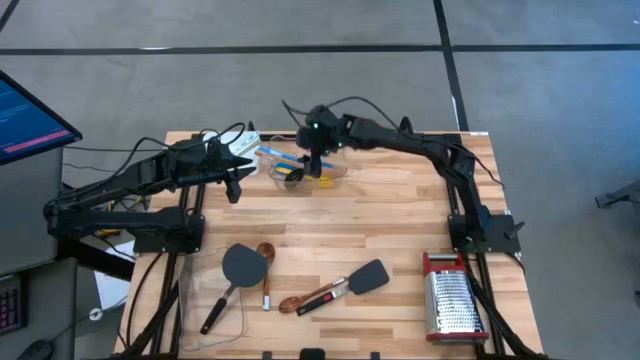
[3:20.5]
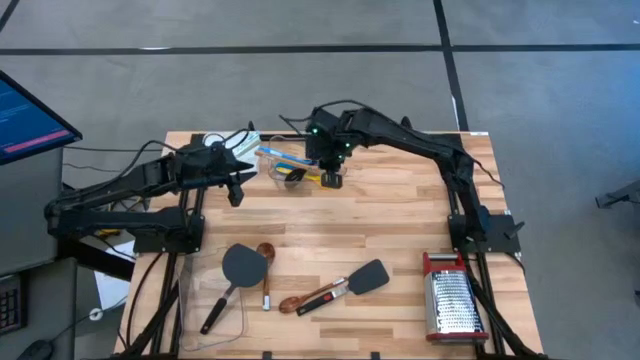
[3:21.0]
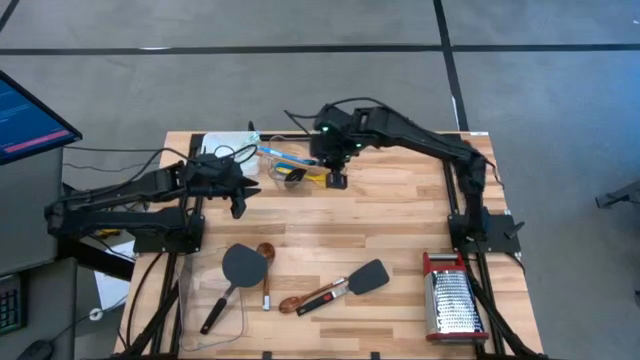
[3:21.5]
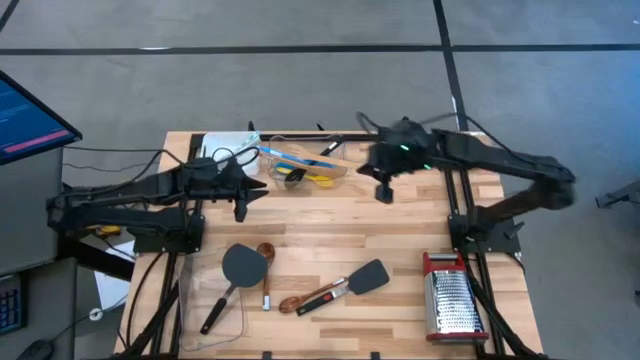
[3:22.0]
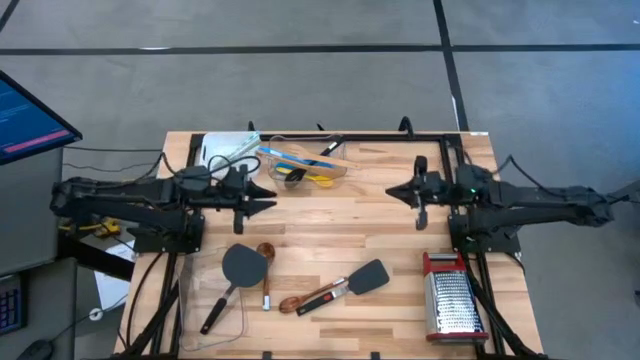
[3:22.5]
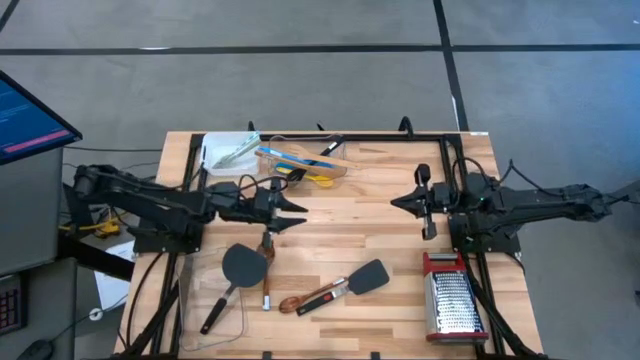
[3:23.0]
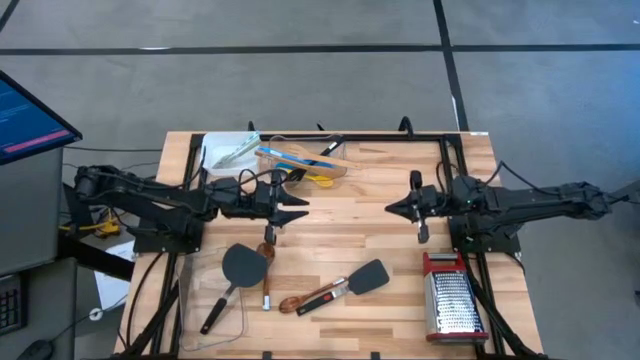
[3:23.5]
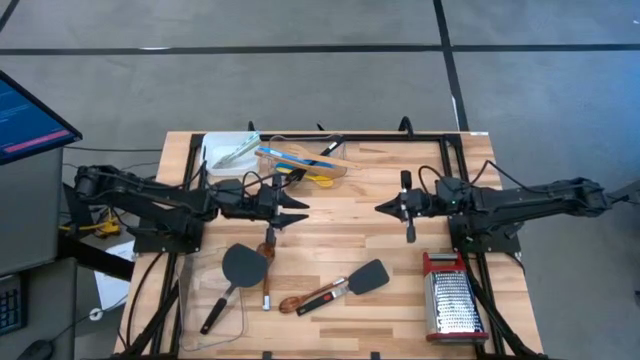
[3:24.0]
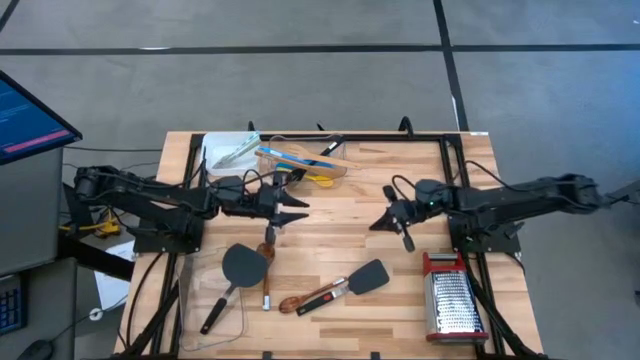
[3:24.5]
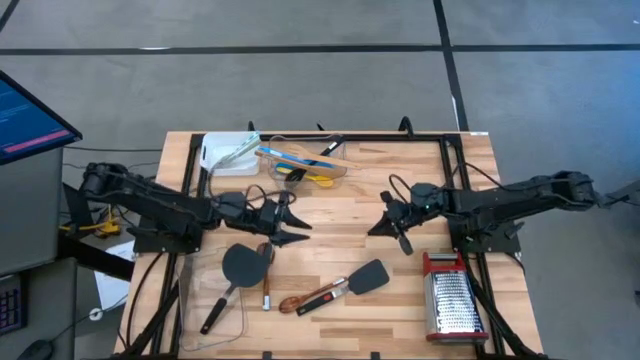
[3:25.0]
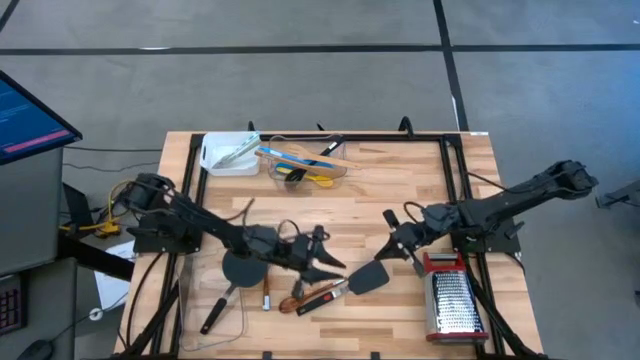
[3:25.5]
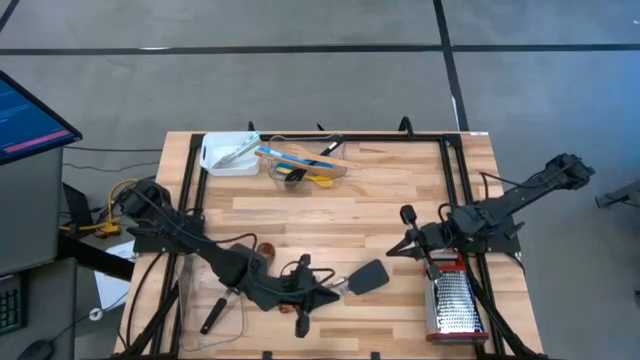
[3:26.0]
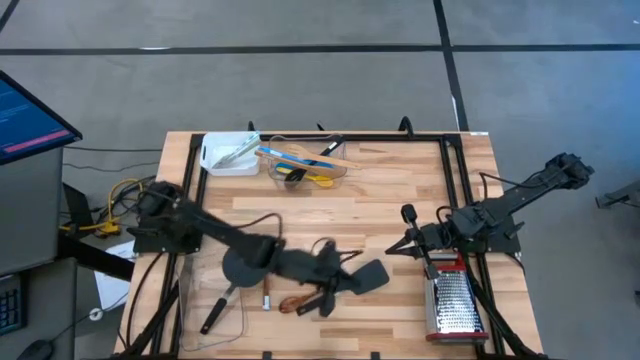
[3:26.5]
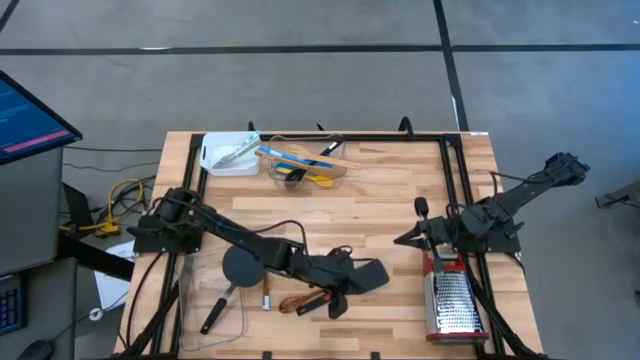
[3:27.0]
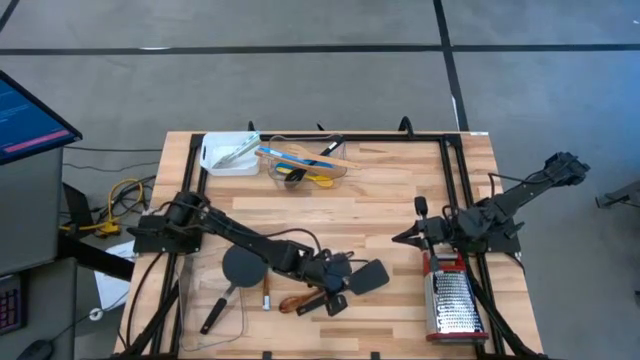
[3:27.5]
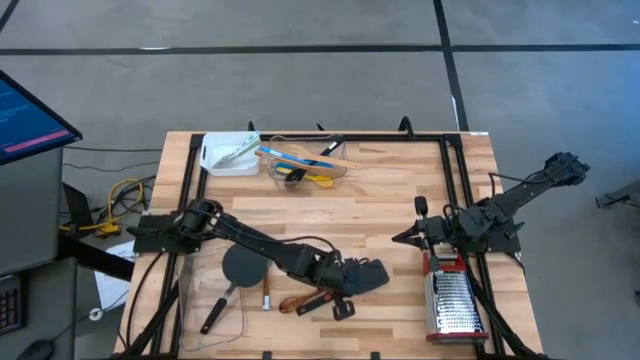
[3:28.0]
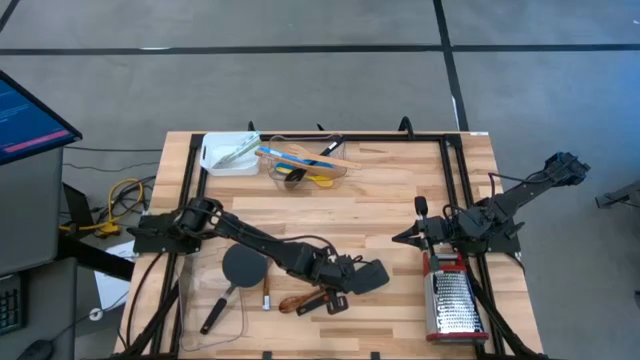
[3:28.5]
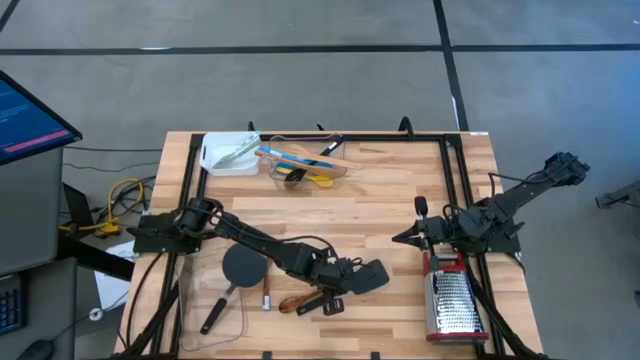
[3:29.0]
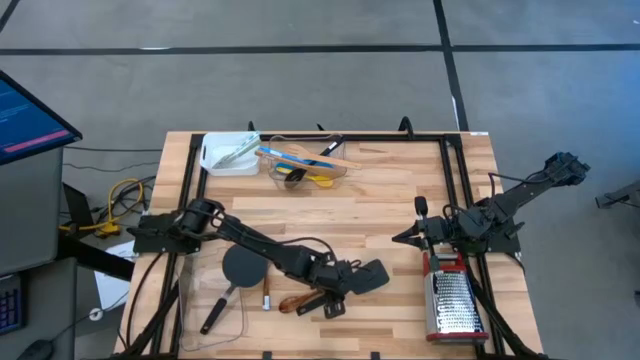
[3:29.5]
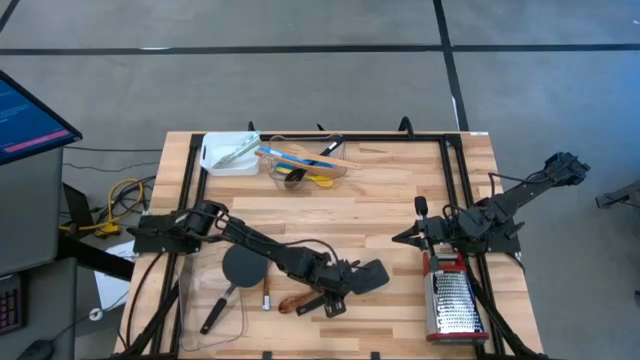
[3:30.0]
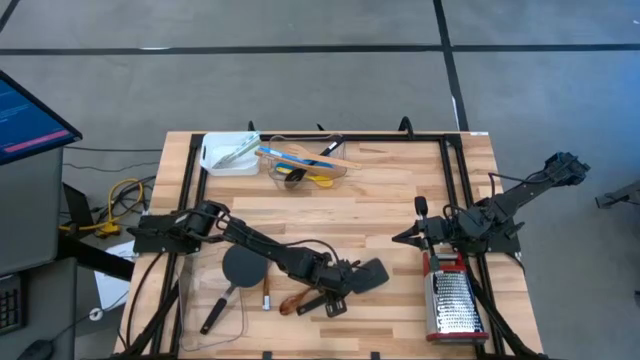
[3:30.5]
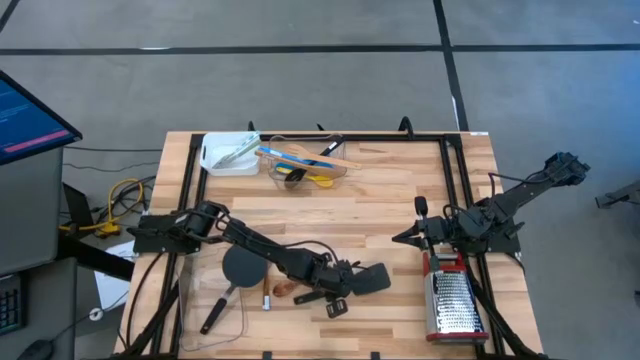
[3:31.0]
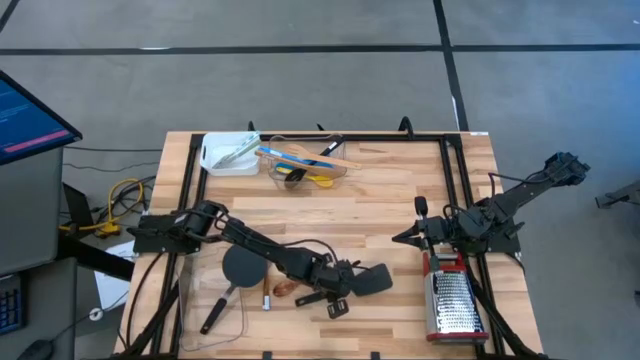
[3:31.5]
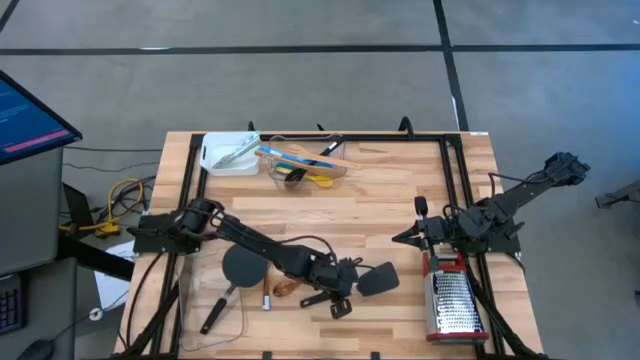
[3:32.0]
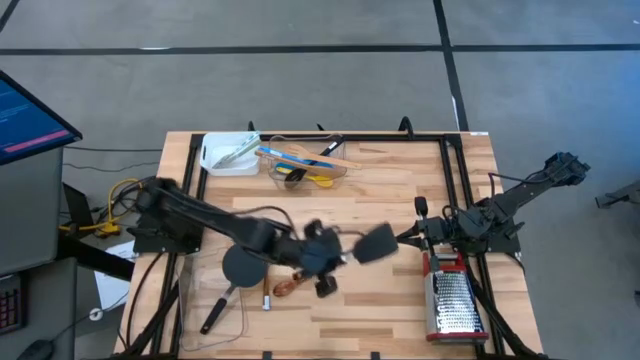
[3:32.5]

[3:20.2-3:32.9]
Task: Pick & Place Kitchen Items
Put the black slotted spatula into the bottom transparent bin

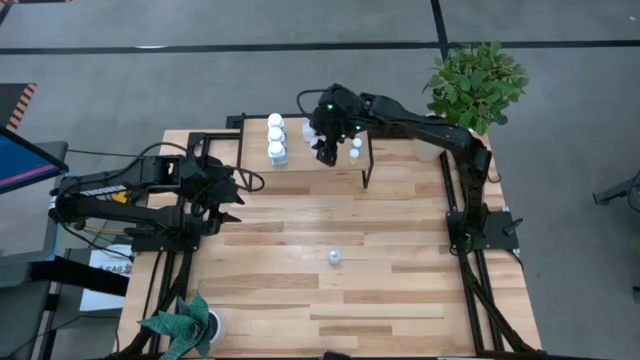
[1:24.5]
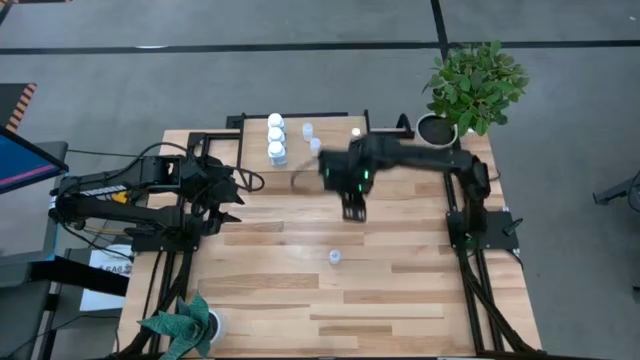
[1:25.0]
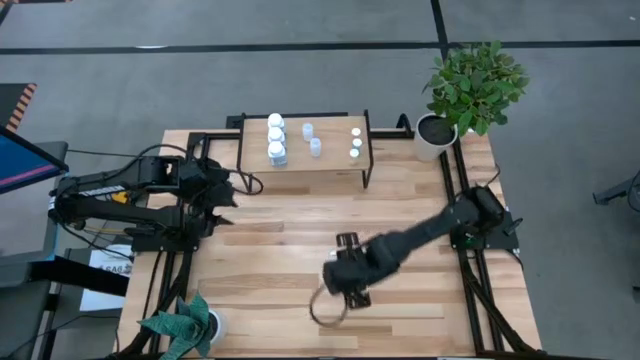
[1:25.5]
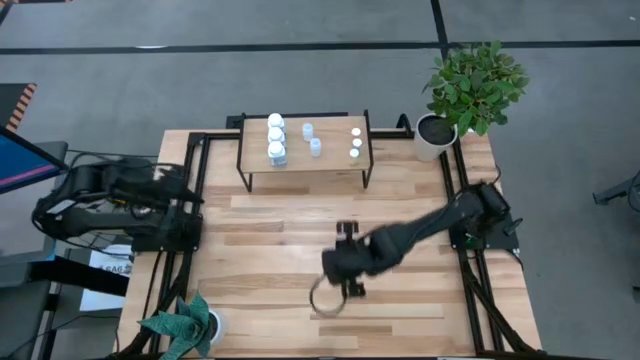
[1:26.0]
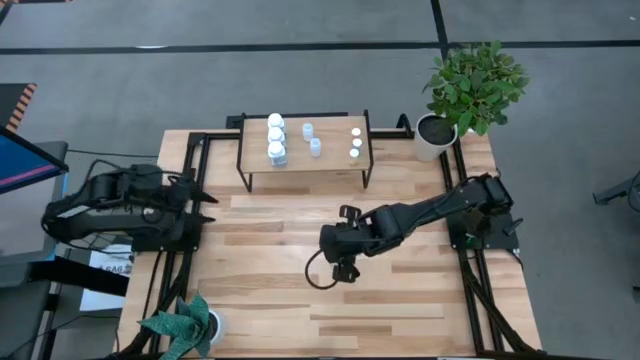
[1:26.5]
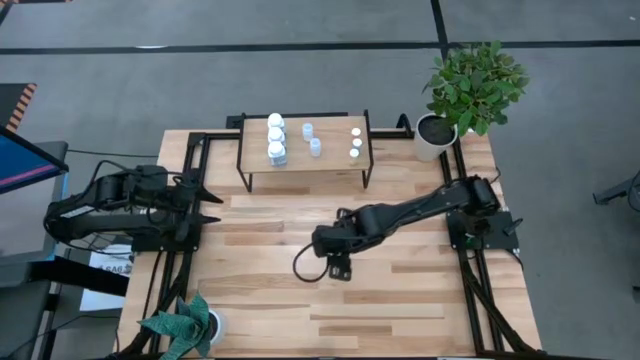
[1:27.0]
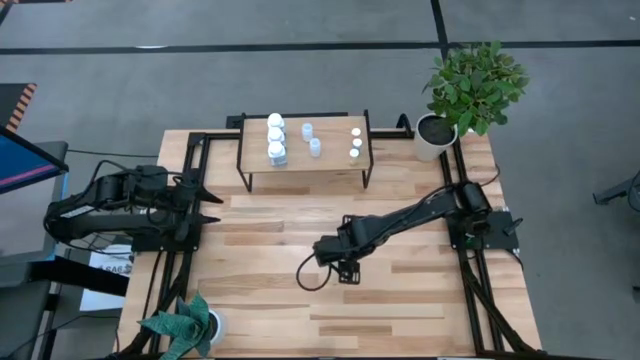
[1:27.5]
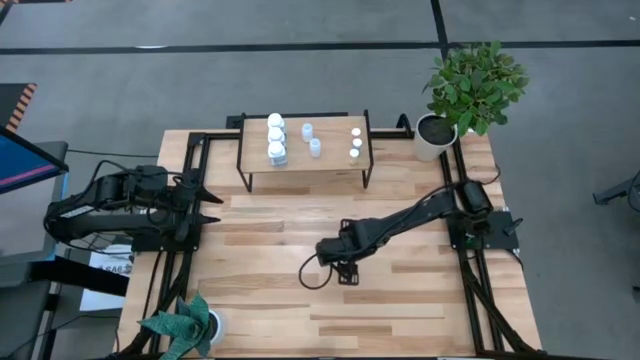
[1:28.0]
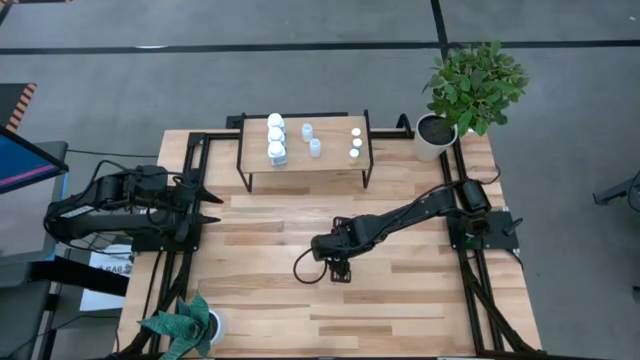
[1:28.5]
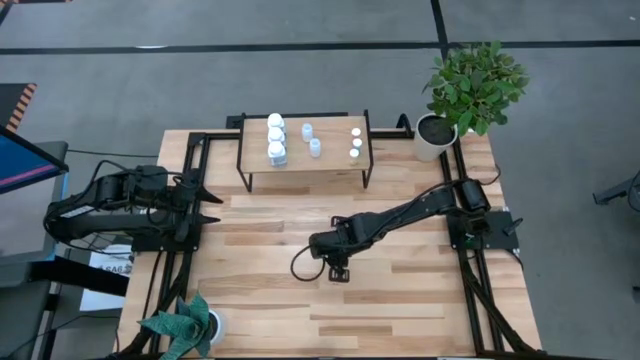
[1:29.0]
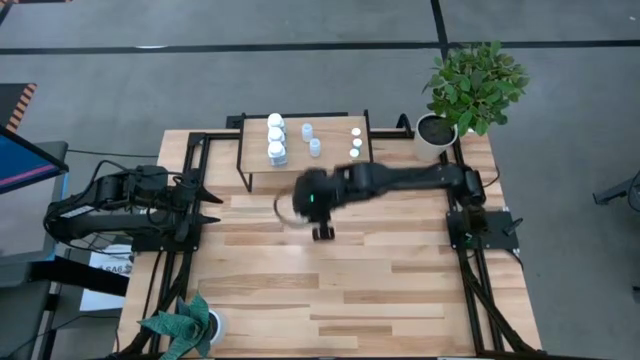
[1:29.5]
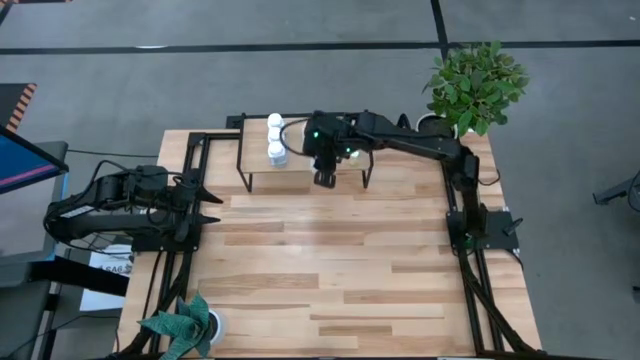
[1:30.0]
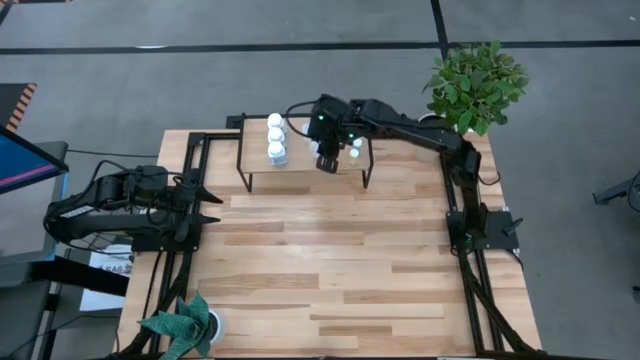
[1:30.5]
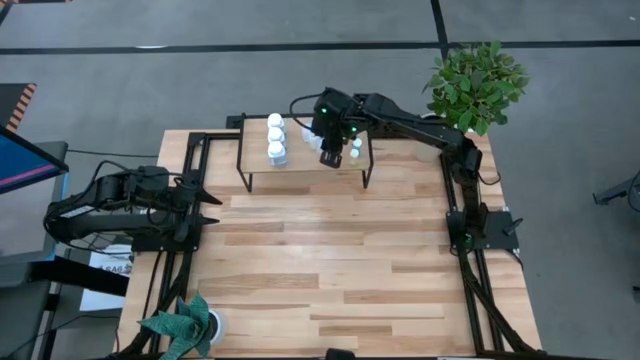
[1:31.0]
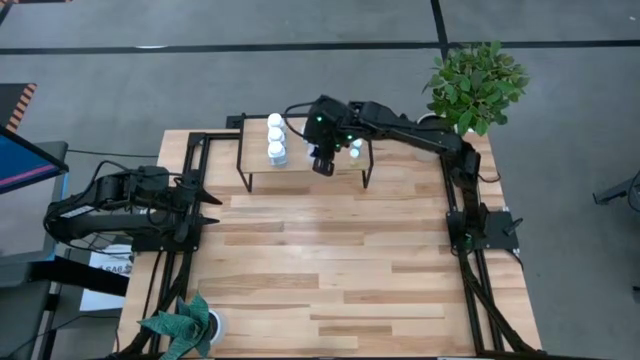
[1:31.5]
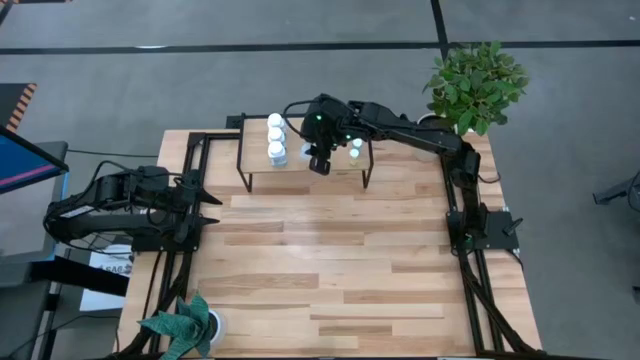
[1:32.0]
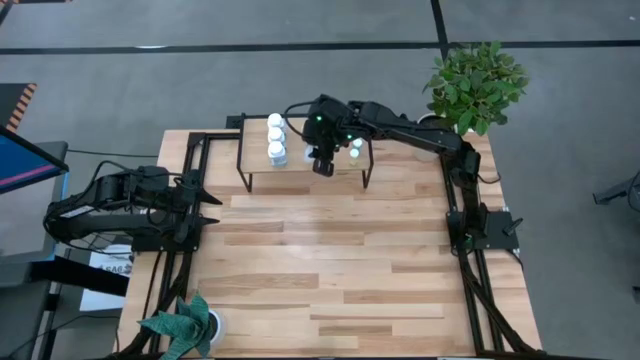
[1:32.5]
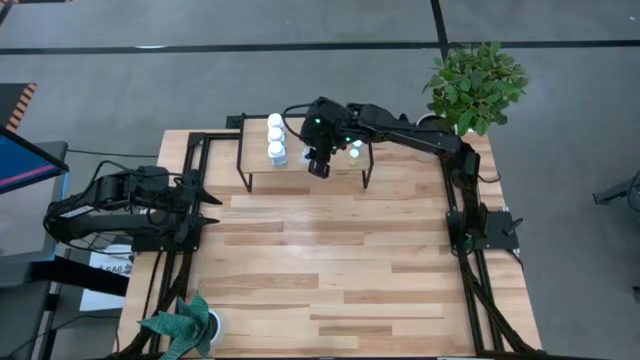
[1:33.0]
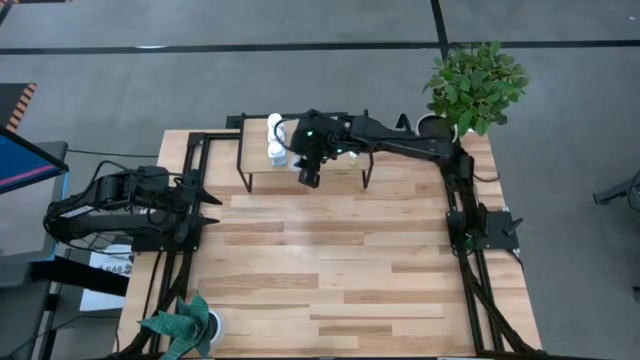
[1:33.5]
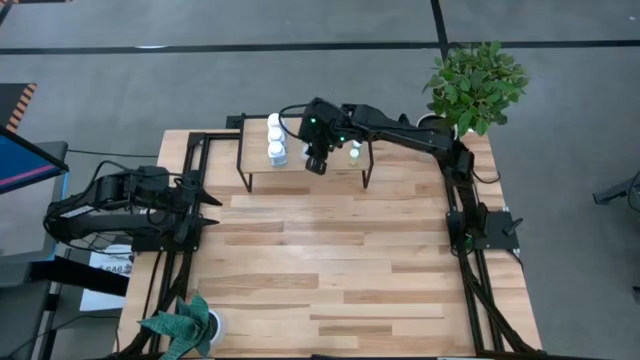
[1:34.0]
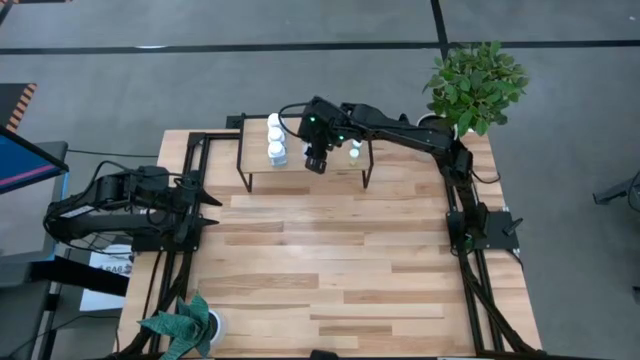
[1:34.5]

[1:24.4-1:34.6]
Task: Pick and place medicine bottles onto shelf by color
Put the transparent pill bottle on the shelf aligned with the other transparent pill bottles
